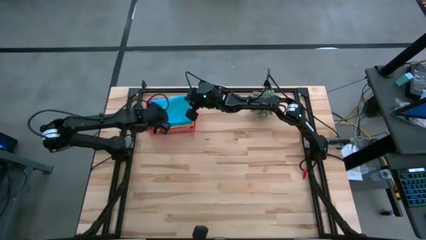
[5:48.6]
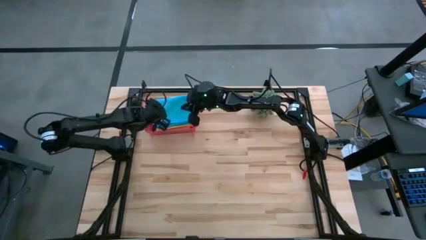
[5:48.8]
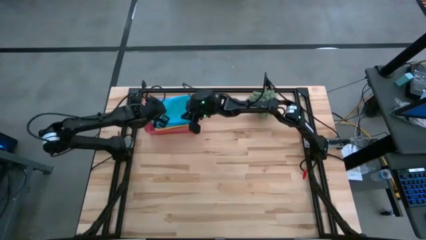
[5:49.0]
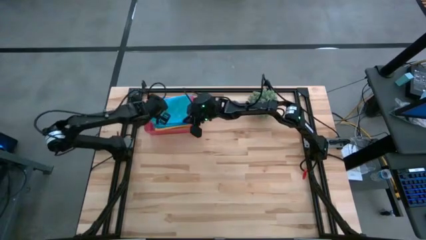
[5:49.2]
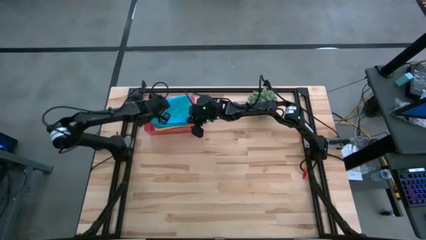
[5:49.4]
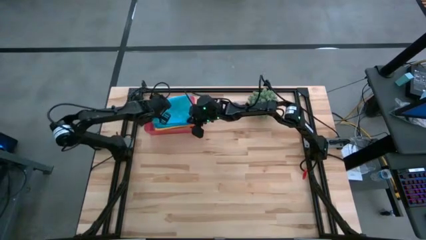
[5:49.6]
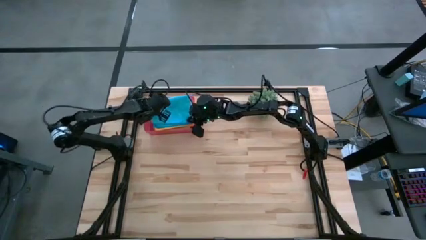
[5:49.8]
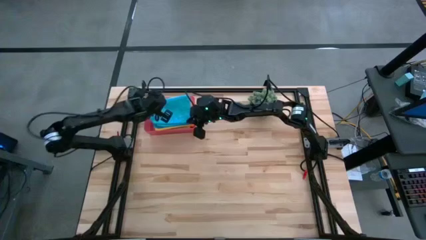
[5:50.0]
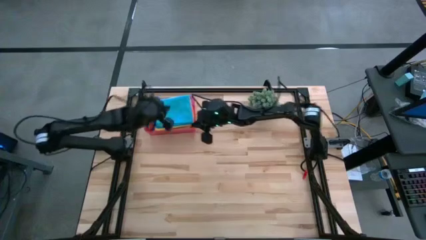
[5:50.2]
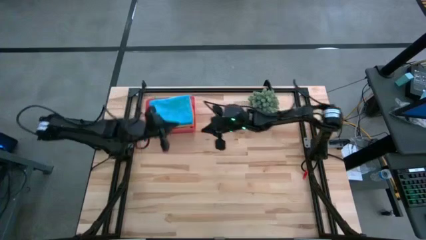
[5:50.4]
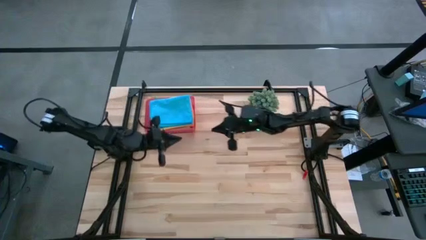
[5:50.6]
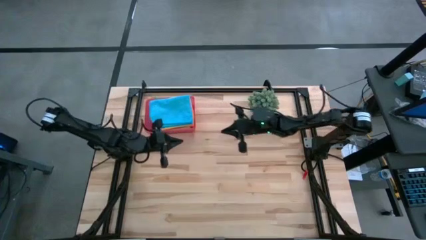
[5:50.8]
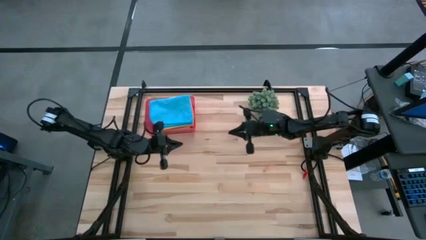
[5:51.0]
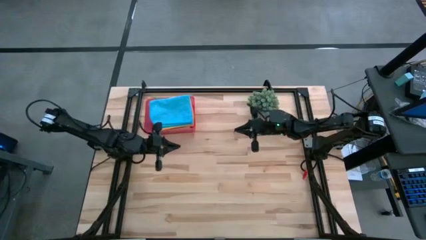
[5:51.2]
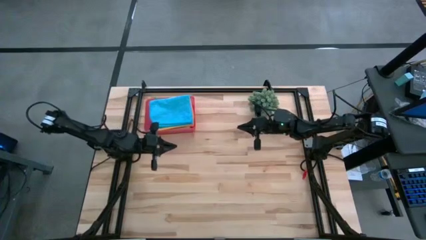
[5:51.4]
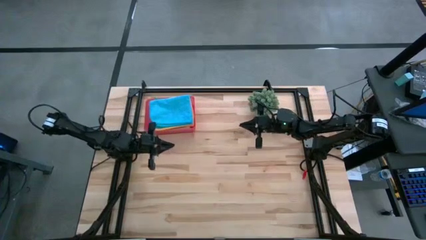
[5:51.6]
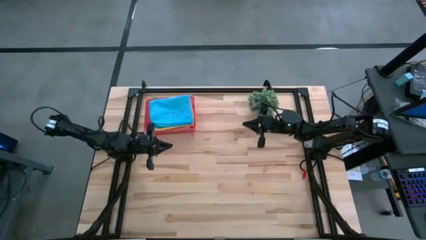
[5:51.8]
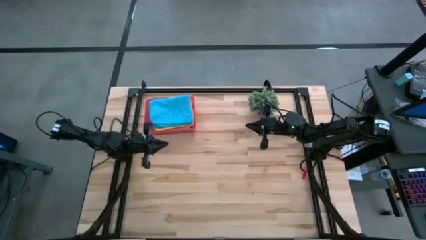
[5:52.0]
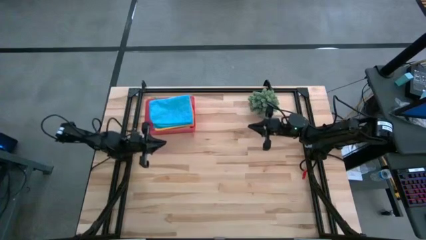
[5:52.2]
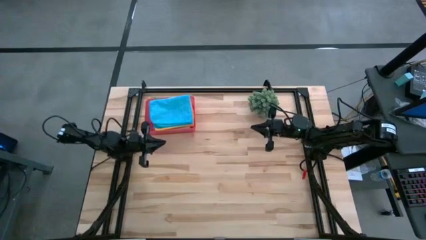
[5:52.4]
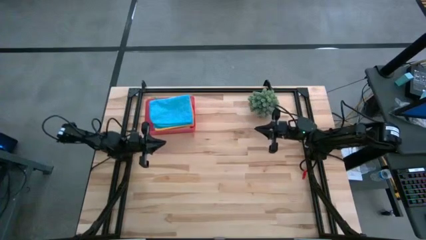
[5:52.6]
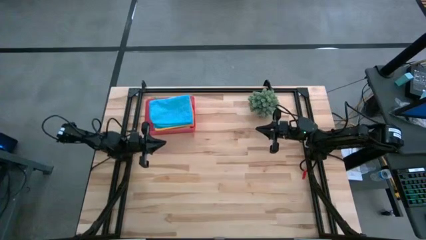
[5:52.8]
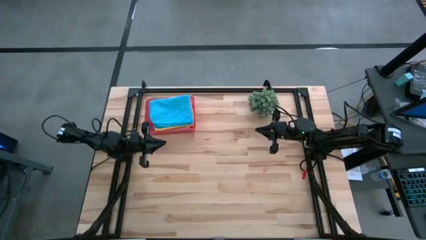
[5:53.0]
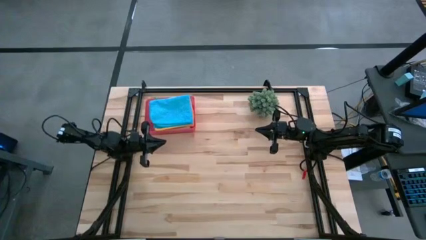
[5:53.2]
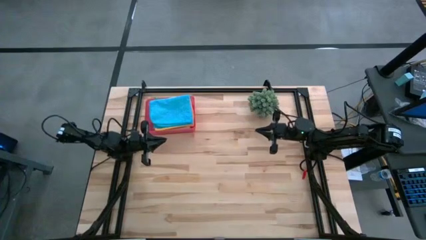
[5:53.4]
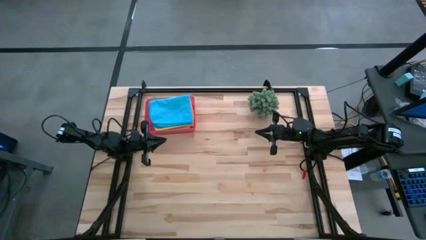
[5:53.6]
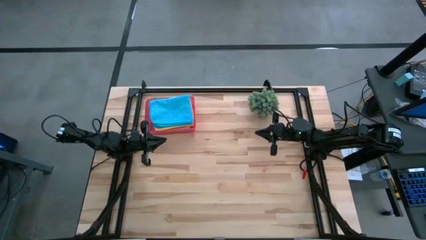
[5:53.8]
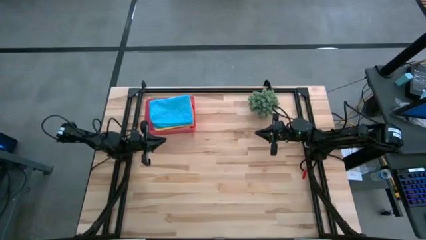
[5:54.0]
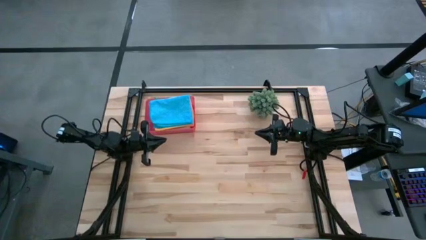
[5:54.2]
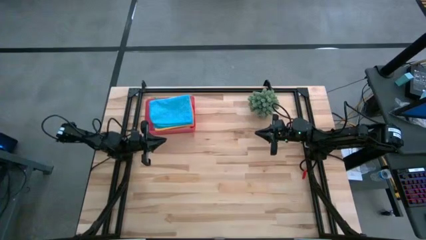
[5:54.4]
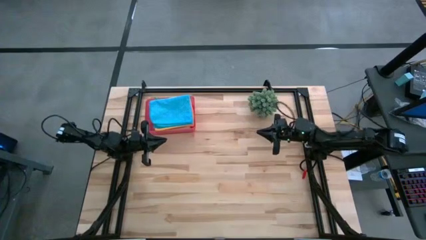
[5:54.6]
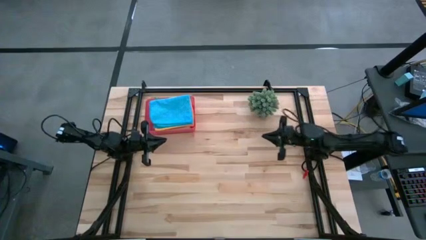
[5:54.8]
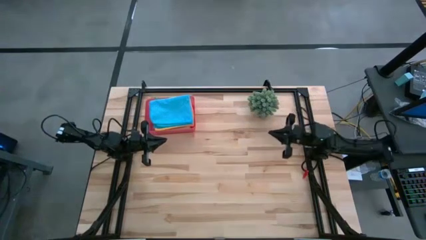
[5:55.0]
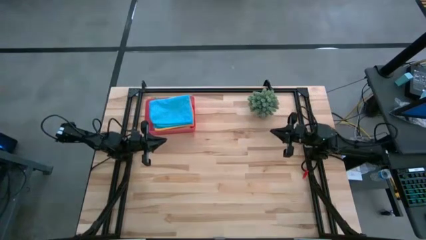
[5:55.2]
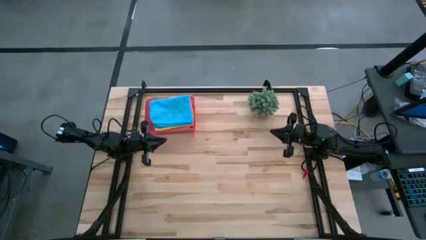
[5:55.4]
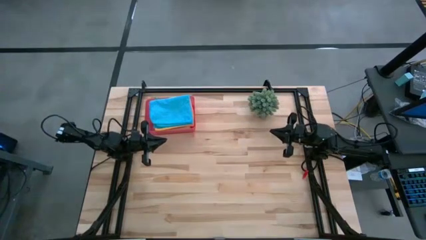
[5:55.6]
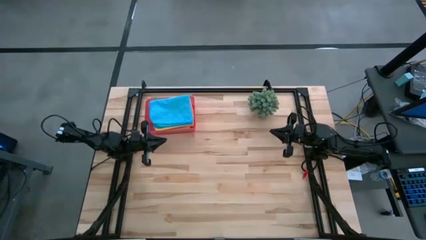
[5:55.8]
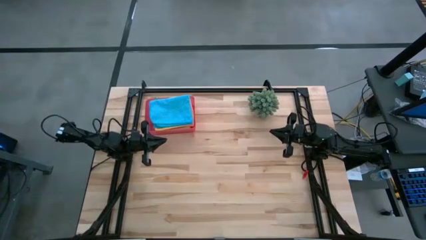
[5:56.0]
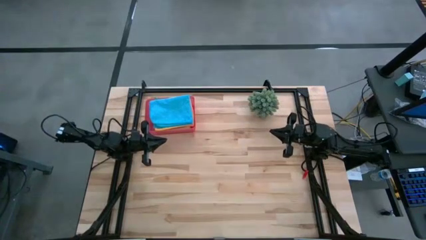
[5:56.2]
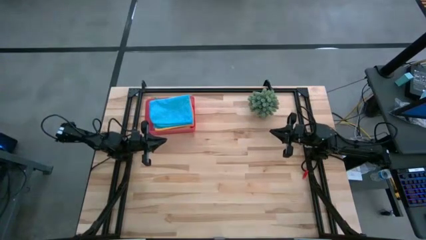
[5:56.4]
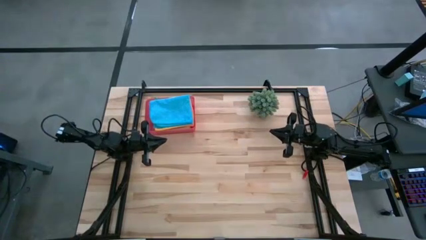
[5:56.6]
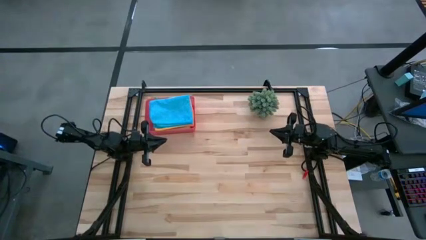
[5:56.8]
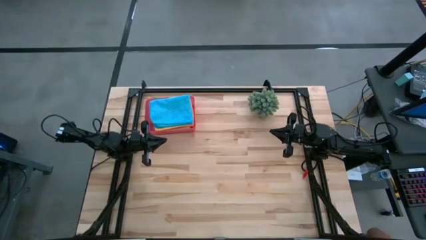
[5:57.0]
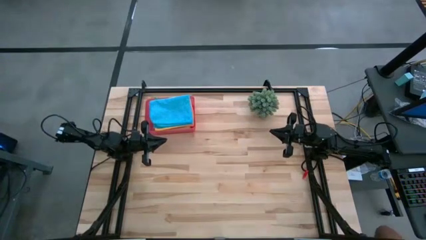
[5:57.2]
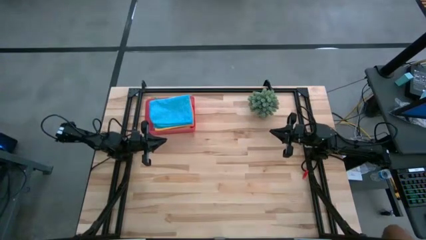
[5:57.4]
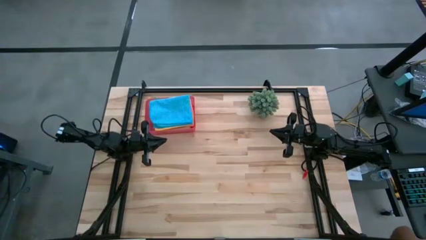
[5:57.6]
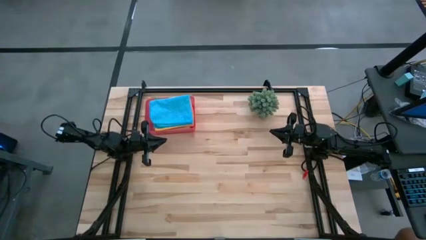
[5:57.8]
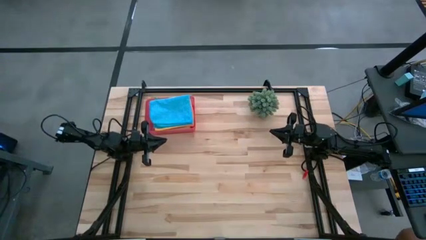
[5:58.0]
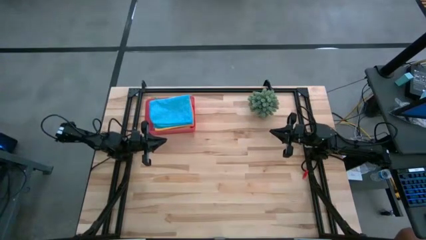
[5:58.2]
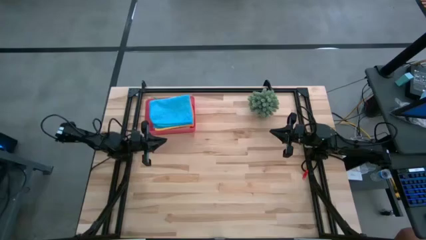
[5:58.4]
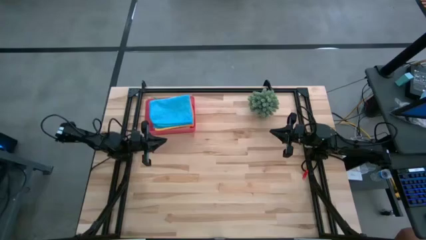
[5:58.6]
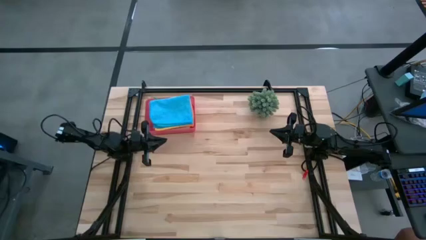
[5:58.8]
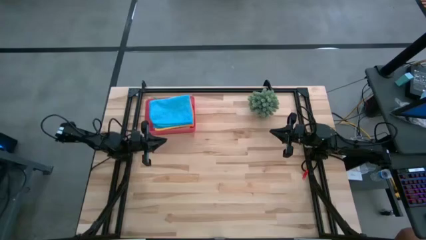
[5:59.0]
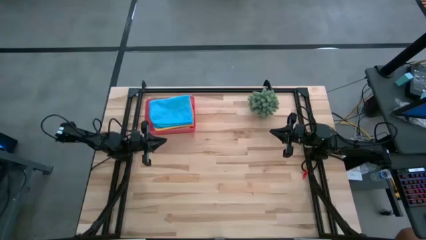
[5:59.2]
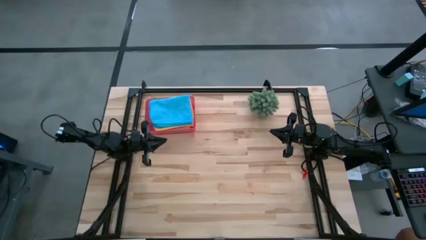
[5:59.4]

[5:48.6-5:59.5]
Task: Fold microfiber towels
Return to Home Position
